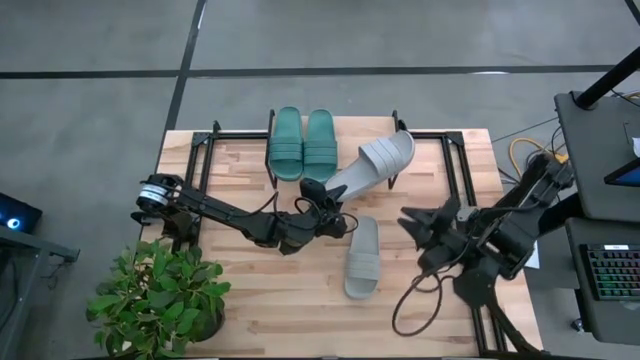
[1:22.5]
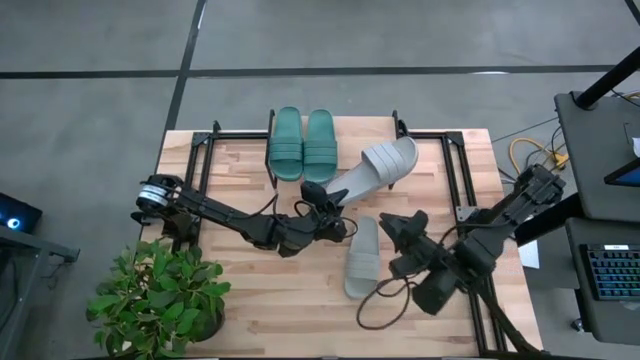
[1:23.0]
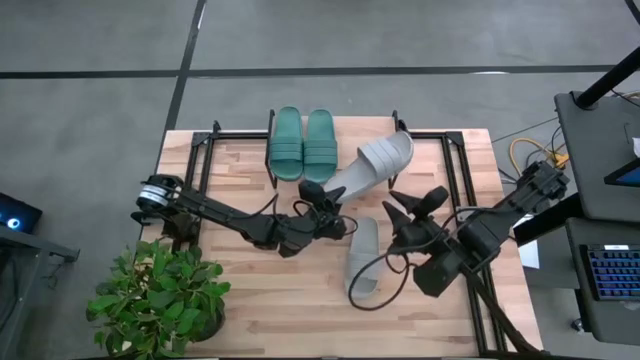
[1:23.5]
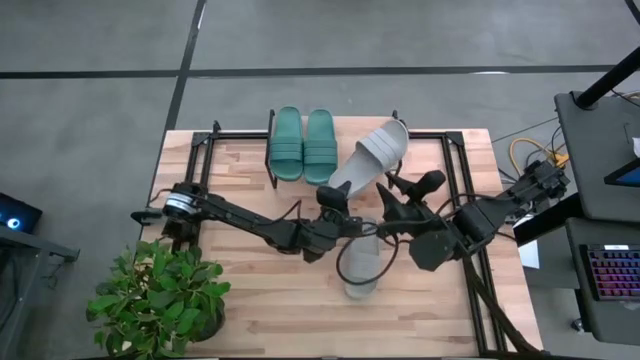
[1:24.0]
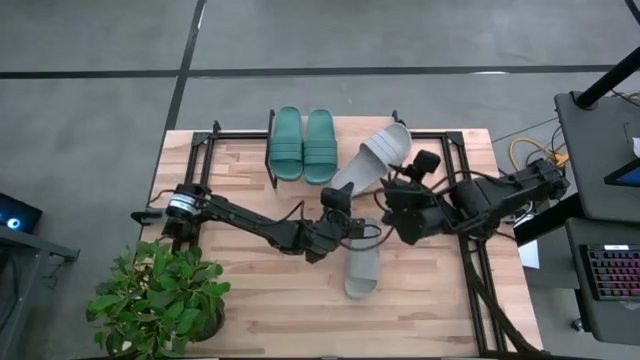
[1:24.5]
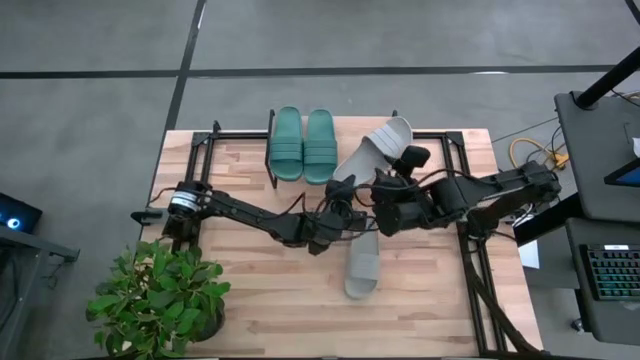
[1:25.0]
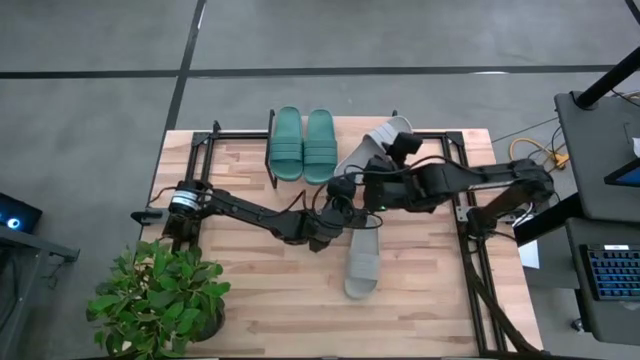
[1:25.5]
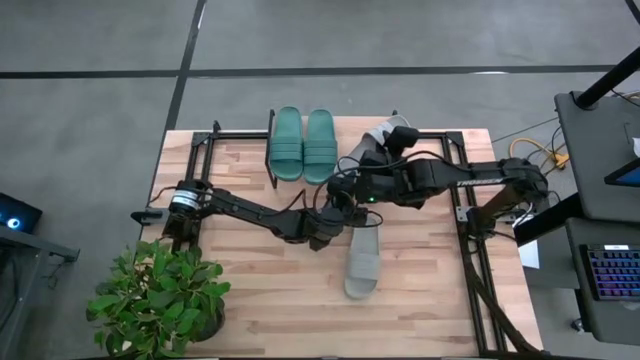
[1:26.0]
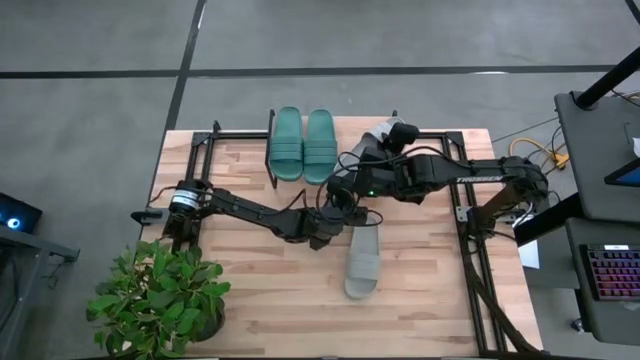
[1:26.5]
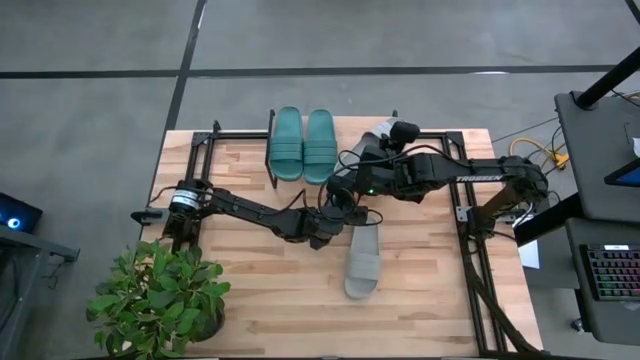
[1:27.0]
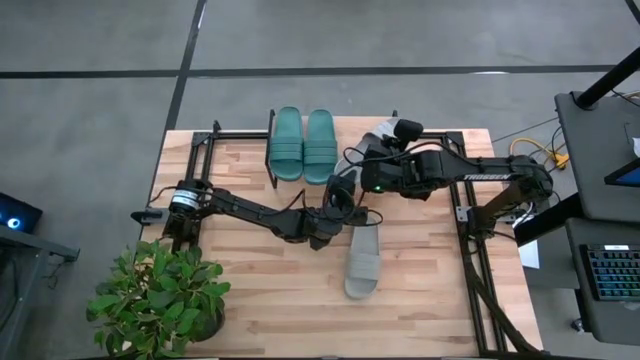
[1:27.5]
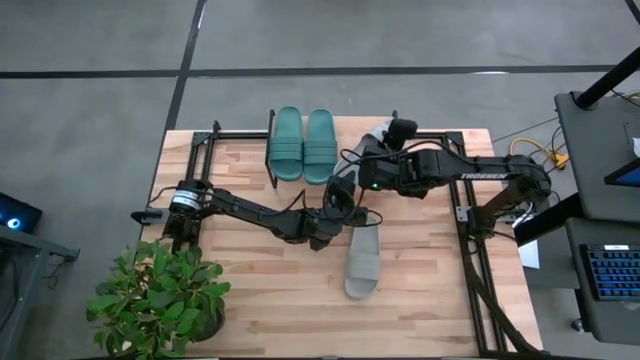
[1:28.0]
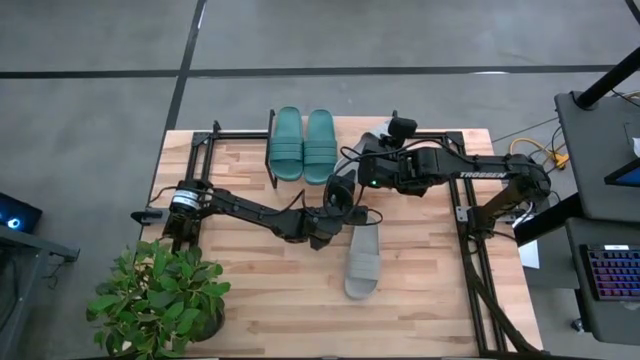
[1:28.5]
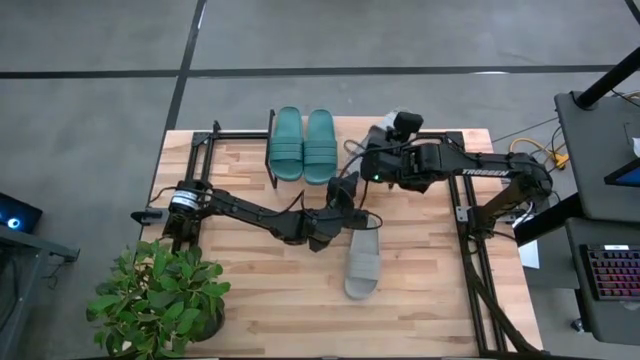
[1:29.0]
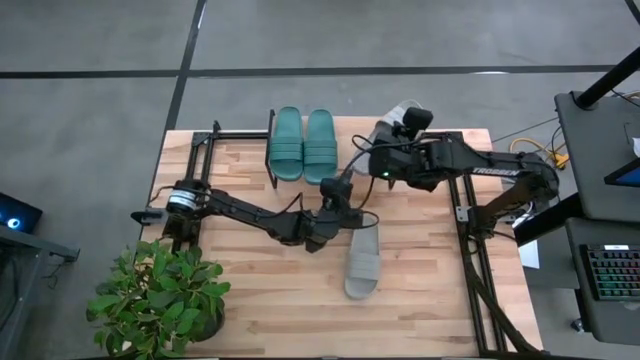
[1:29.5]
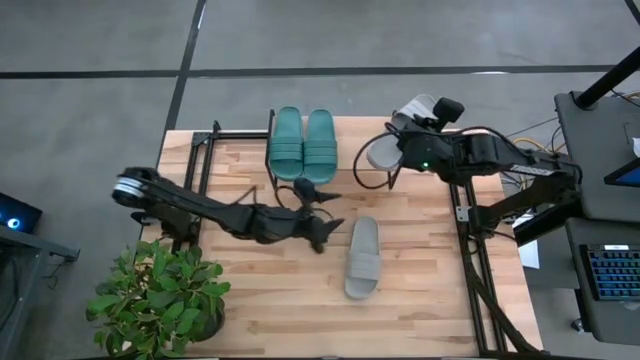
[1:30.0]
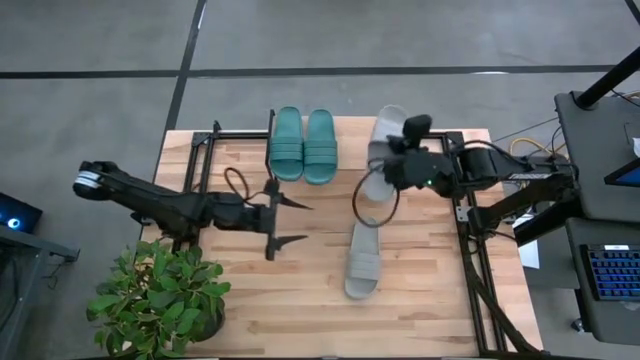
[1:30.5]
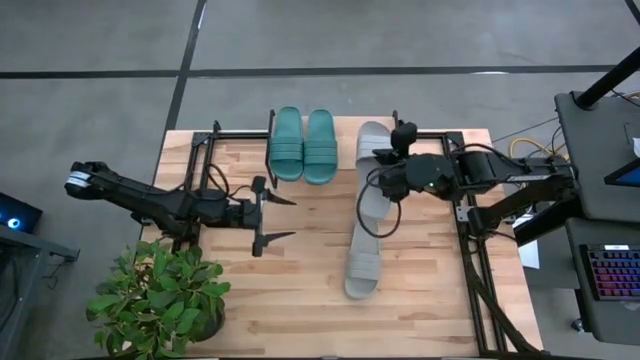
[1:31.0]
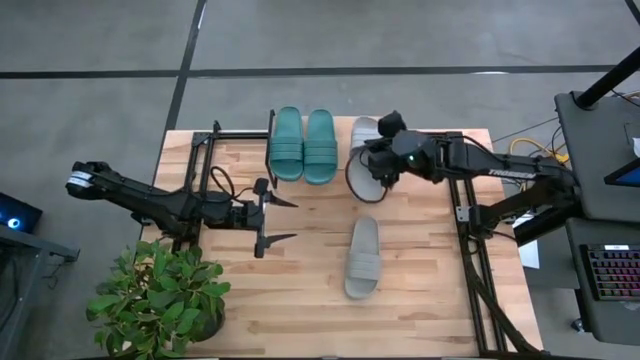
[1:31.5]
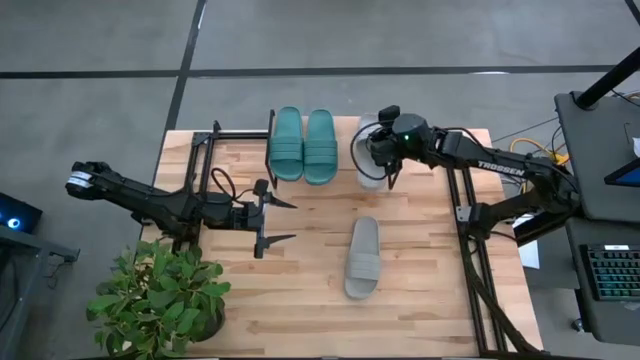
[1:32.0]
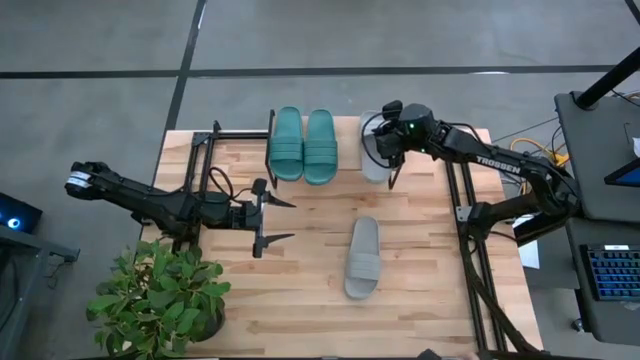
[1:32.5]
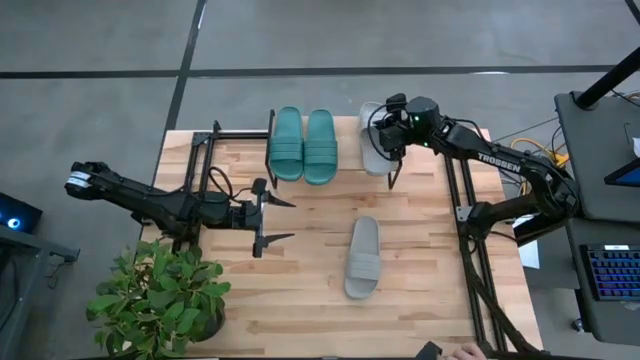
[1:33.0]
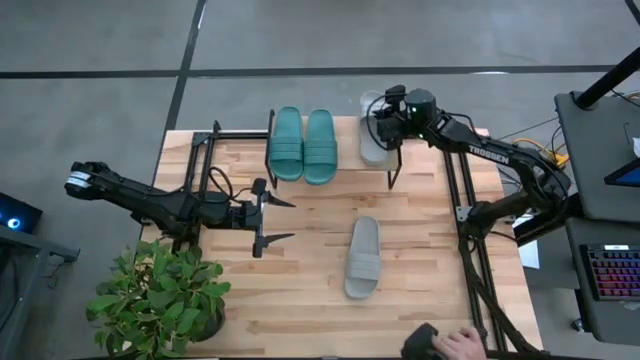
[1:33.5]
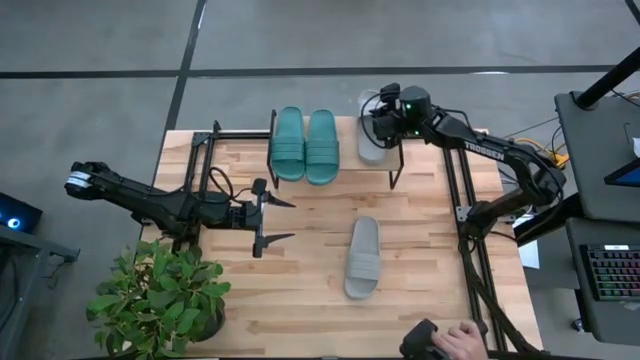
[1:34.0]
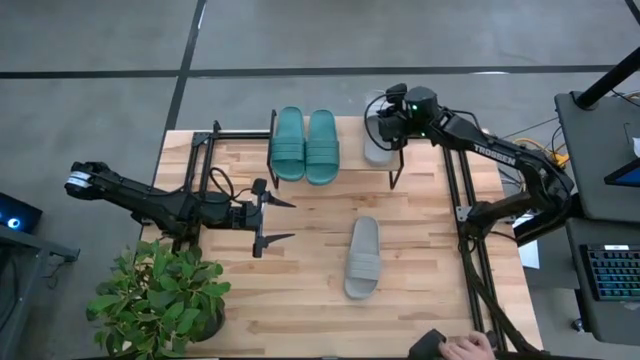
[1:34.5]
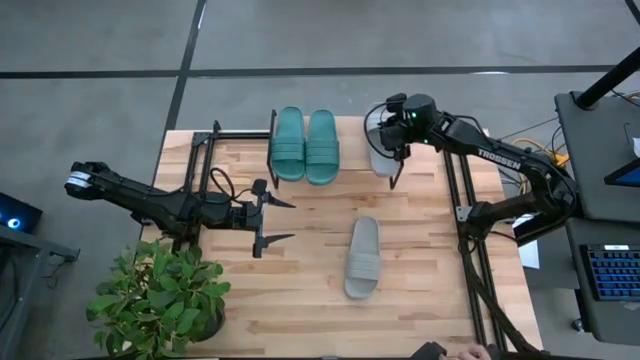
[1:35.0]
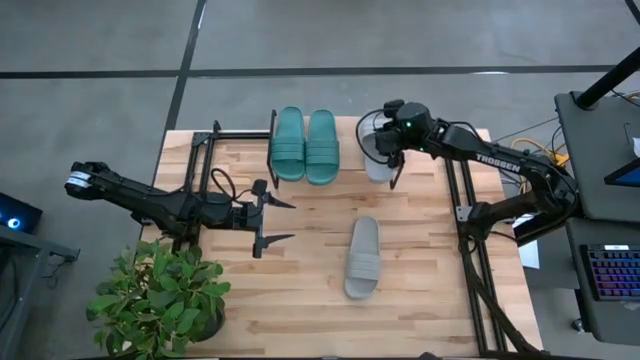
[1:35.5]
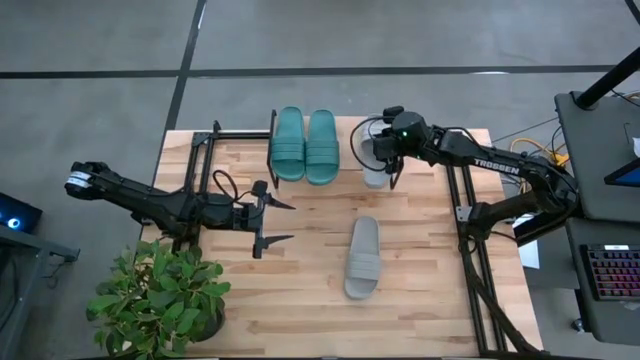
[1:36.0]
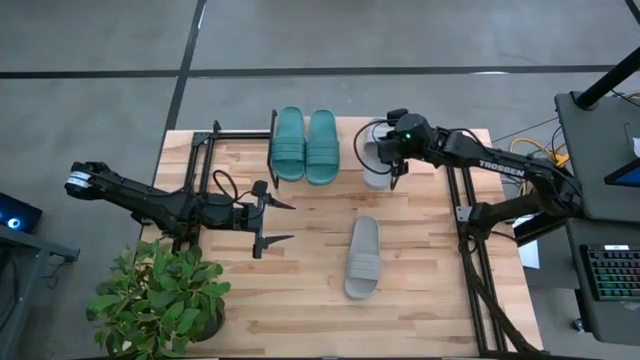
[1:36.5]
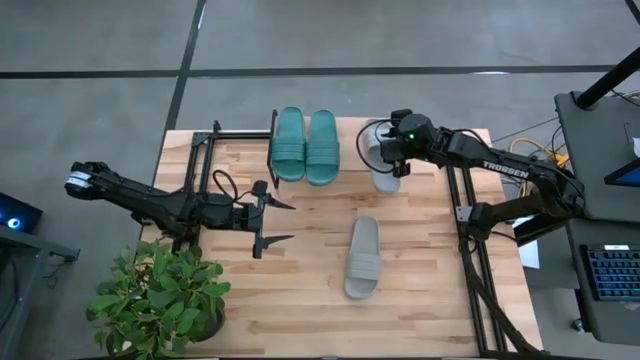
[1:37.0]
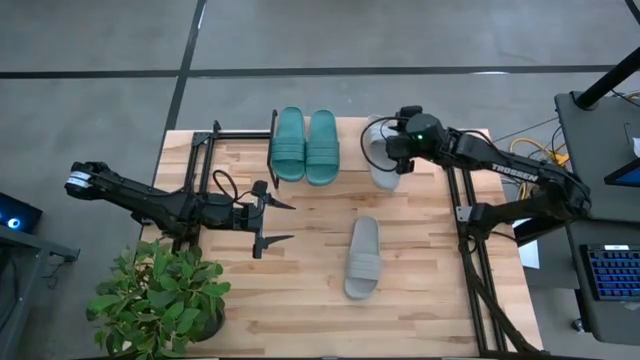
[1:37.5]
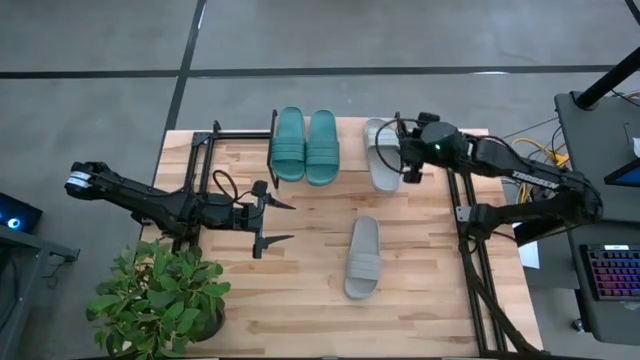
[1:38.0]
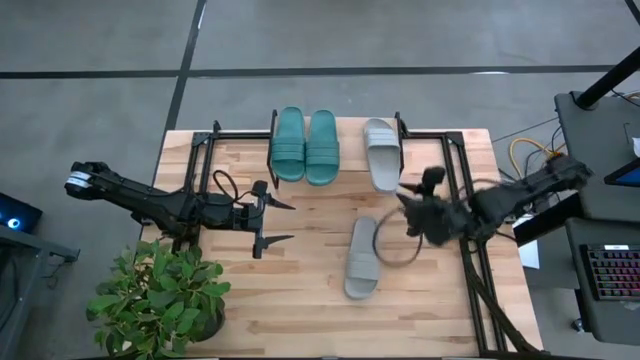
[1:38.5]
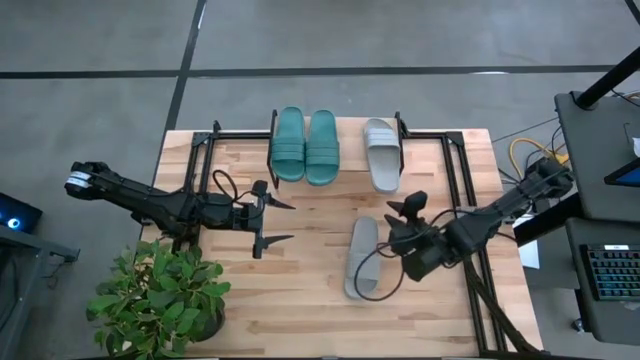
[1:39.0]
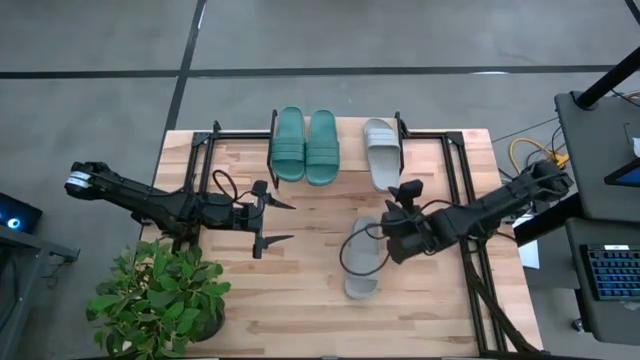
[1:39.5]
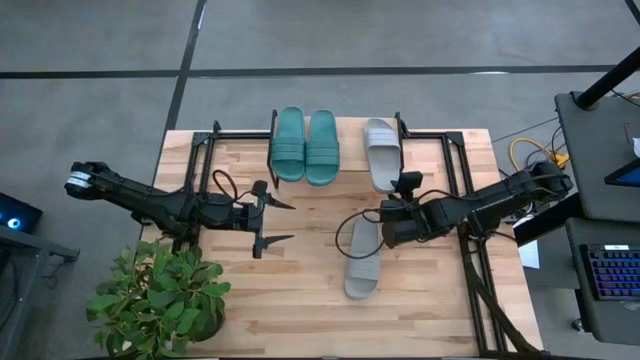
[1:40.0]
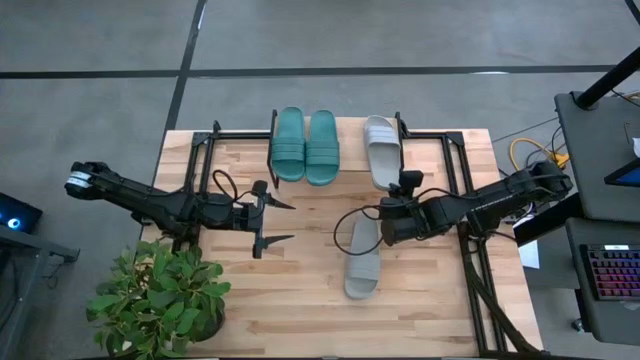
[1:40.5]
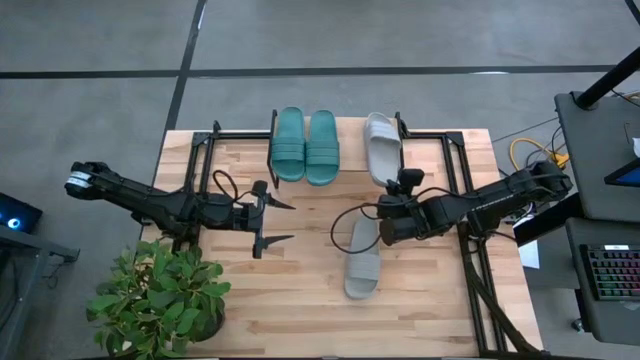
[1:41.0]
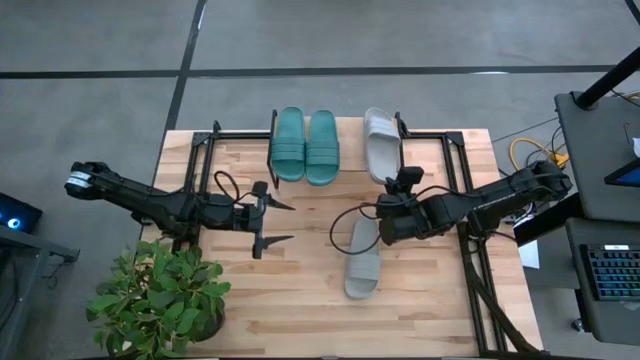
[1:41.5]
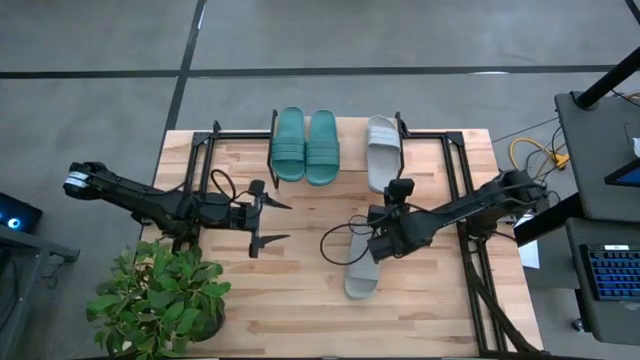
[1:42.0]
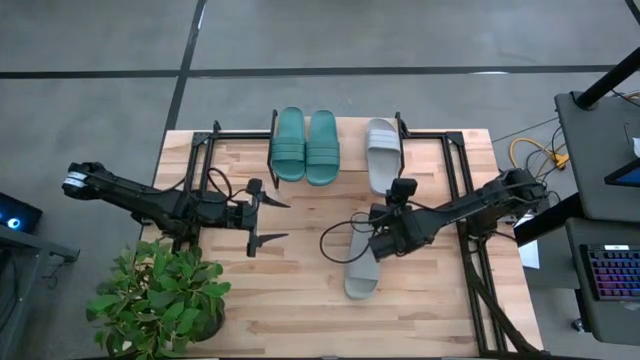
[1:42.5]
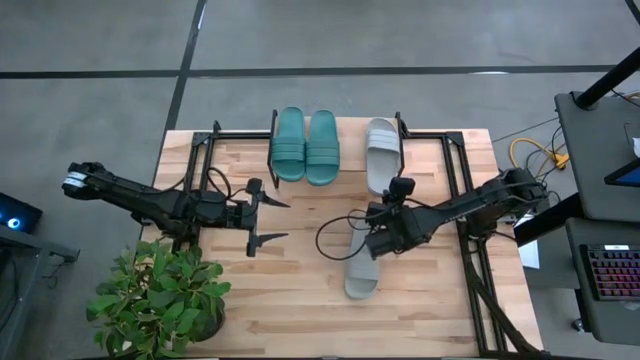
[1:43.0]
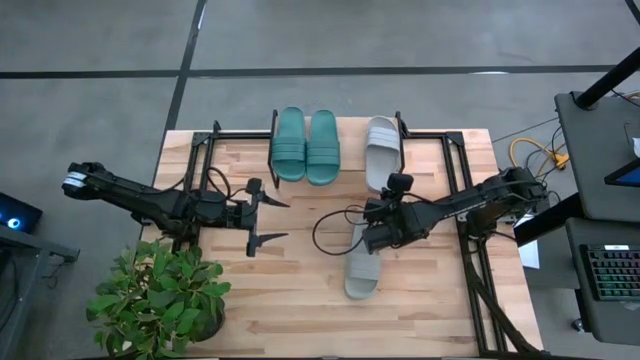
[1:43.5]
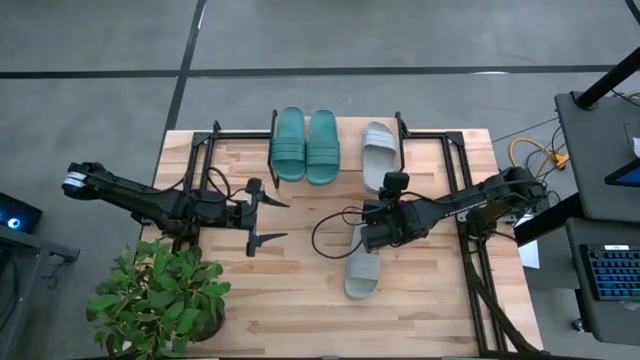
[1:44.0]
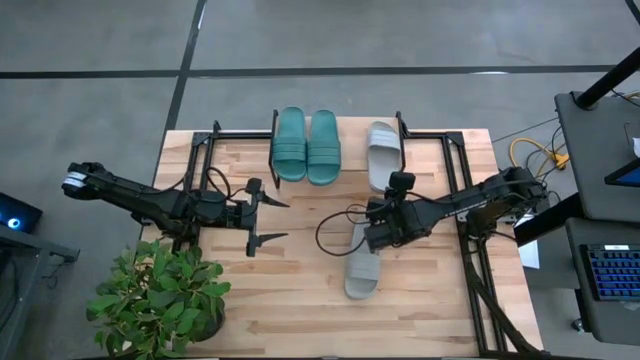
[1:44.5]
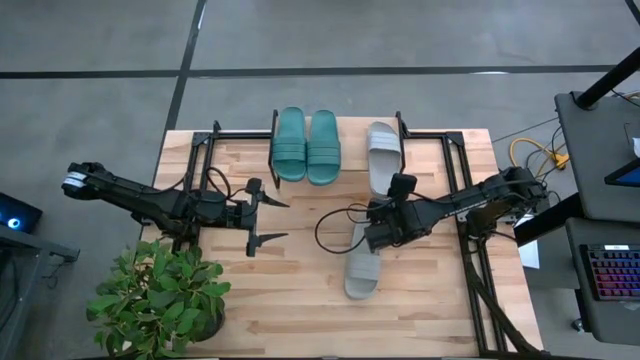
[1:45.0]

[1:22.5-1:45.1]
Task: Pick and place slides into the shelf
Put the left gray slide on the shelf
